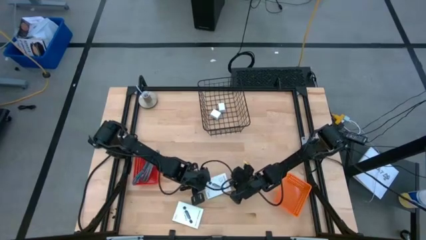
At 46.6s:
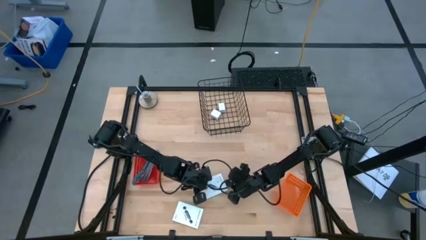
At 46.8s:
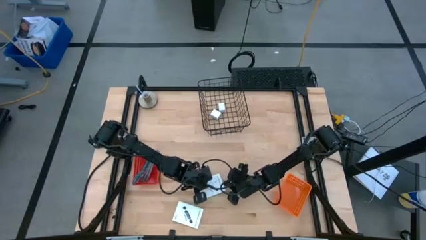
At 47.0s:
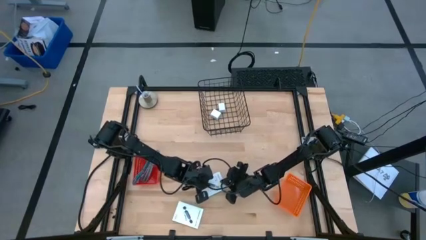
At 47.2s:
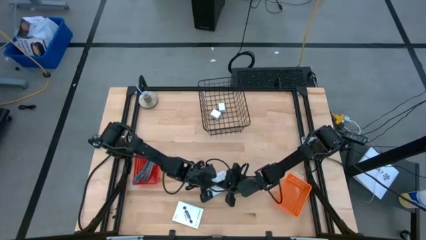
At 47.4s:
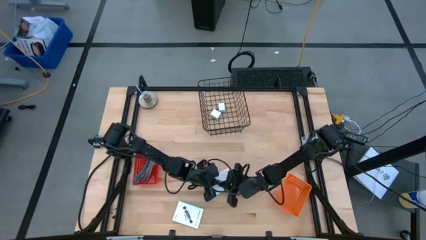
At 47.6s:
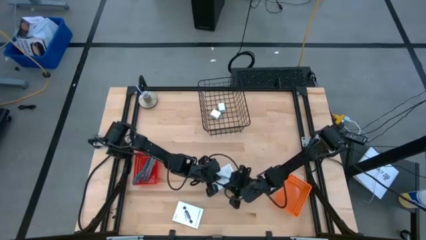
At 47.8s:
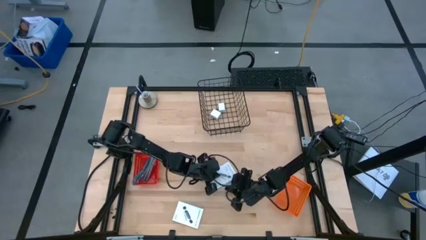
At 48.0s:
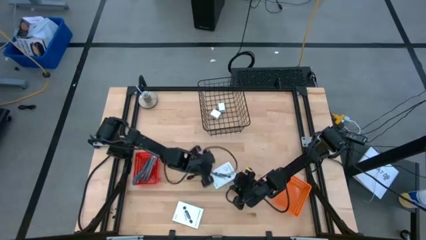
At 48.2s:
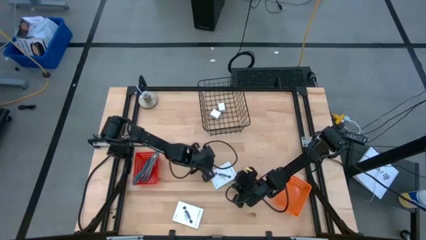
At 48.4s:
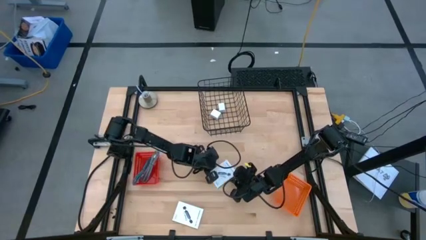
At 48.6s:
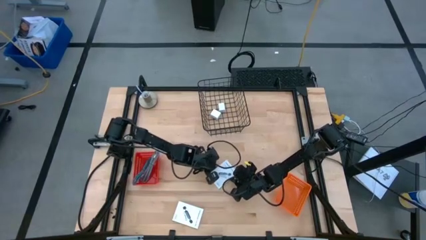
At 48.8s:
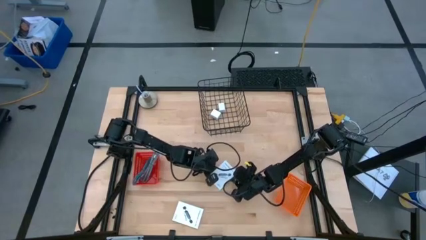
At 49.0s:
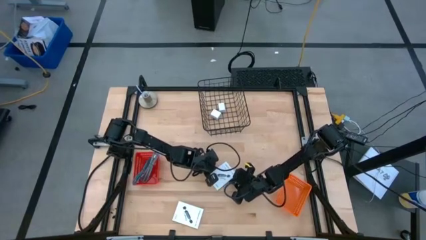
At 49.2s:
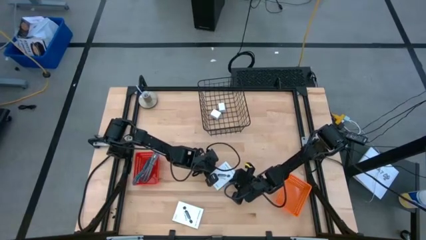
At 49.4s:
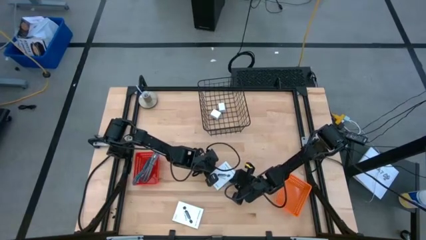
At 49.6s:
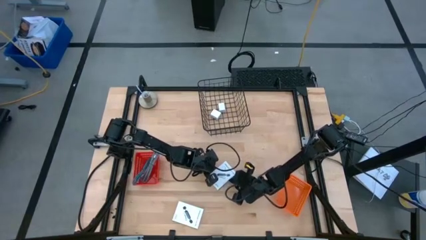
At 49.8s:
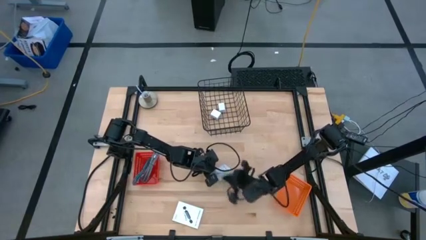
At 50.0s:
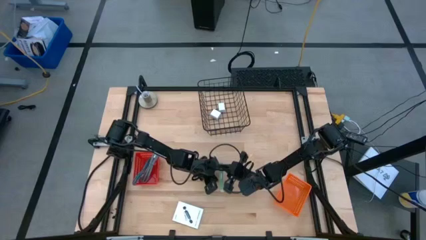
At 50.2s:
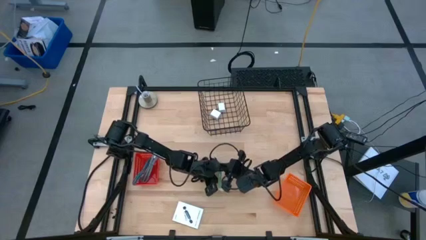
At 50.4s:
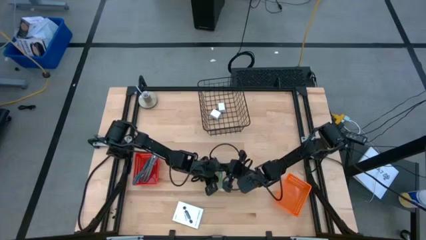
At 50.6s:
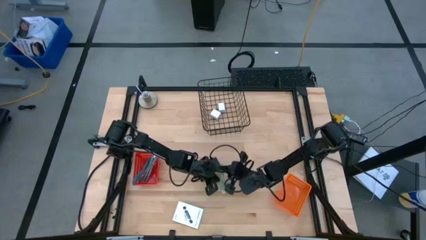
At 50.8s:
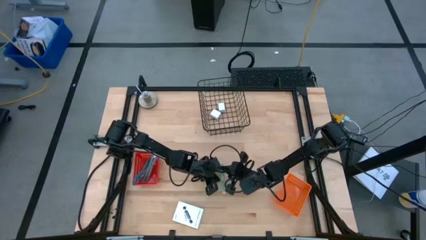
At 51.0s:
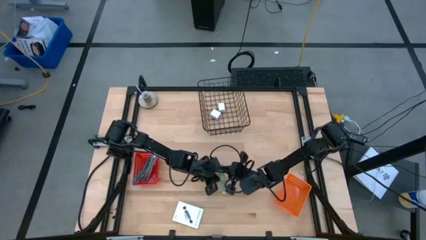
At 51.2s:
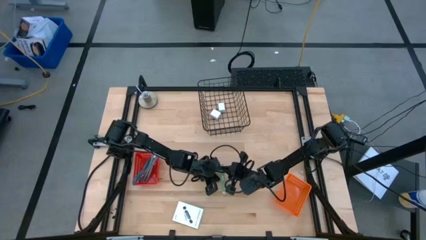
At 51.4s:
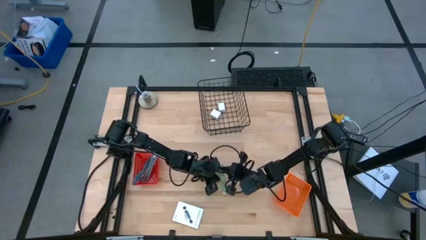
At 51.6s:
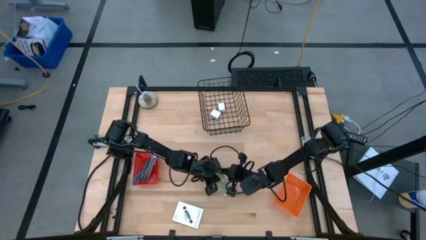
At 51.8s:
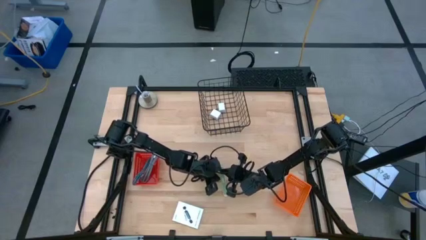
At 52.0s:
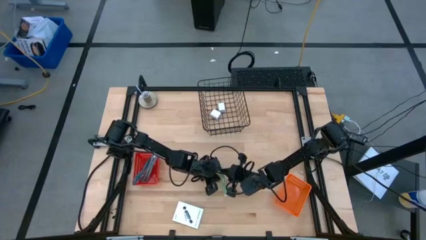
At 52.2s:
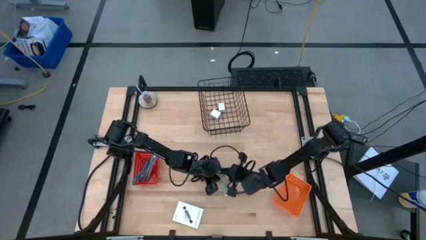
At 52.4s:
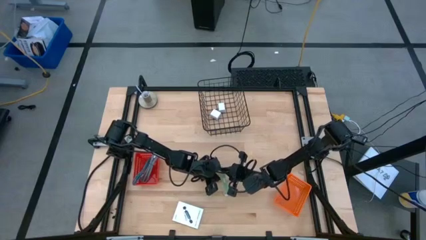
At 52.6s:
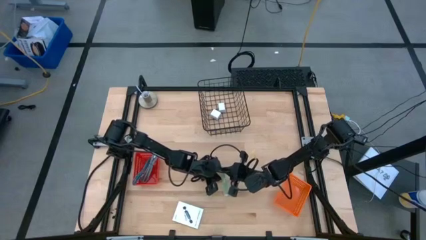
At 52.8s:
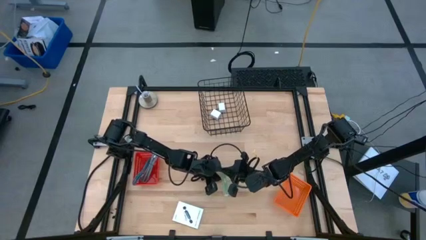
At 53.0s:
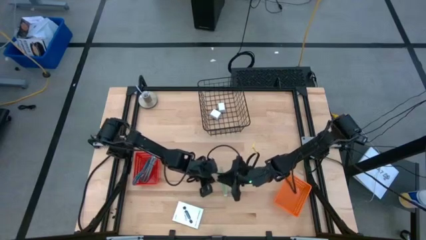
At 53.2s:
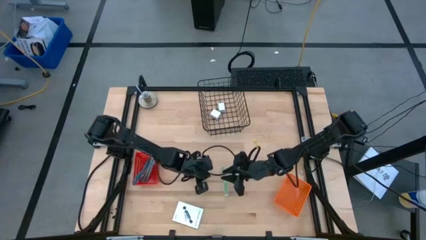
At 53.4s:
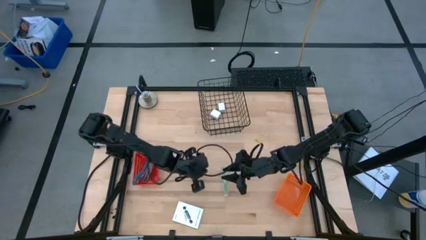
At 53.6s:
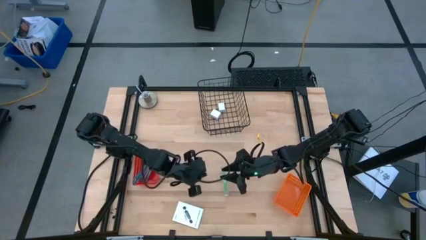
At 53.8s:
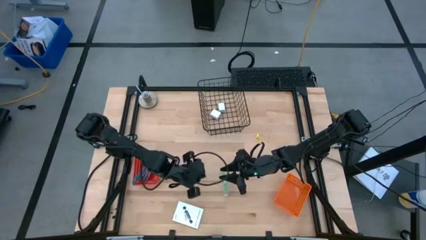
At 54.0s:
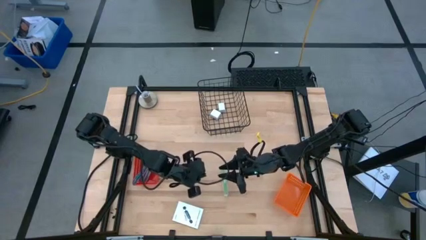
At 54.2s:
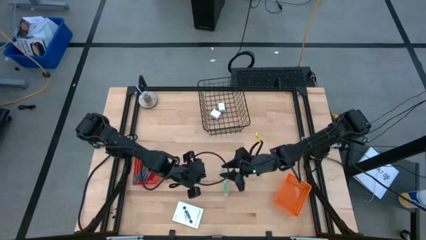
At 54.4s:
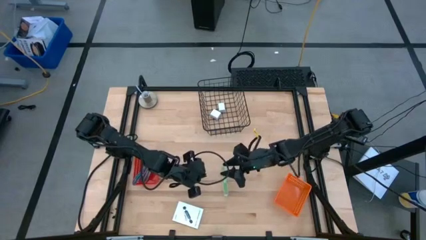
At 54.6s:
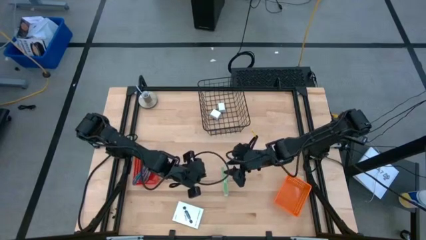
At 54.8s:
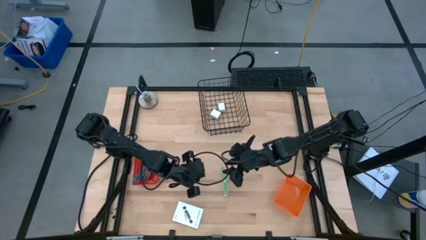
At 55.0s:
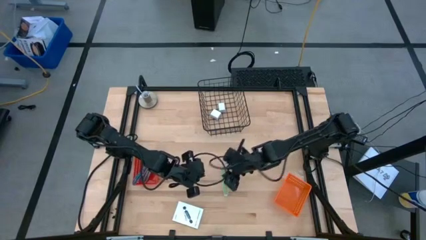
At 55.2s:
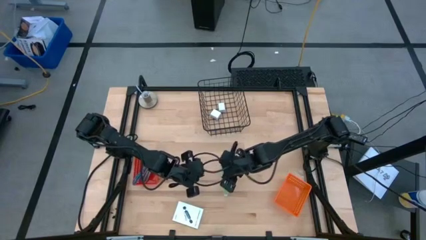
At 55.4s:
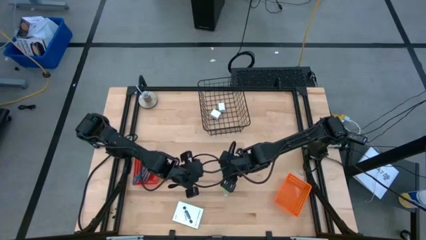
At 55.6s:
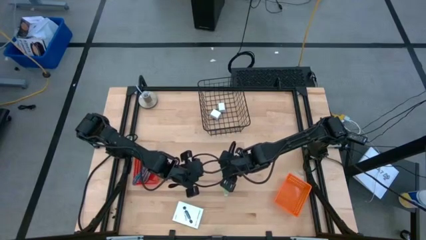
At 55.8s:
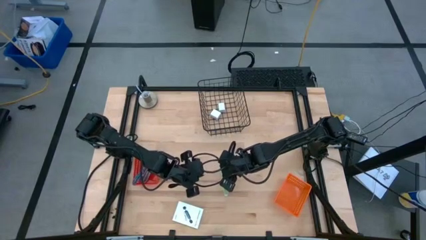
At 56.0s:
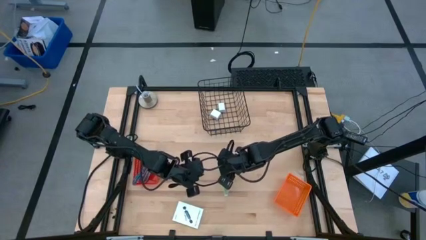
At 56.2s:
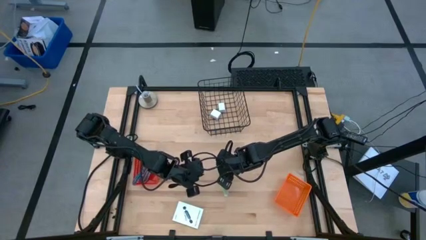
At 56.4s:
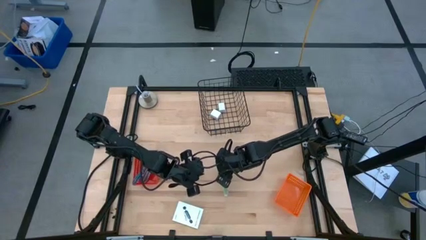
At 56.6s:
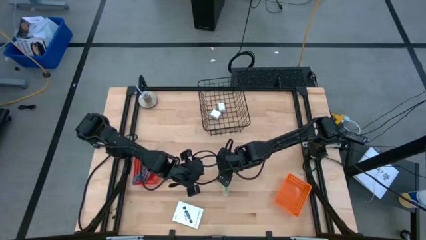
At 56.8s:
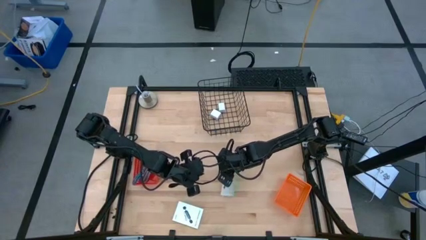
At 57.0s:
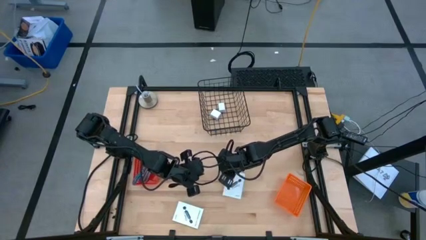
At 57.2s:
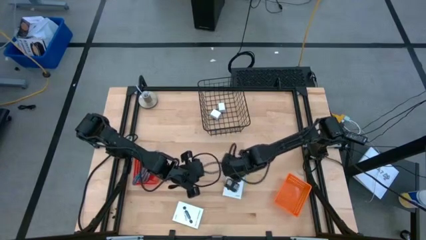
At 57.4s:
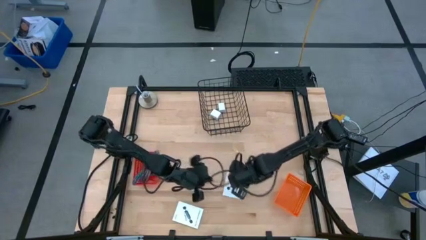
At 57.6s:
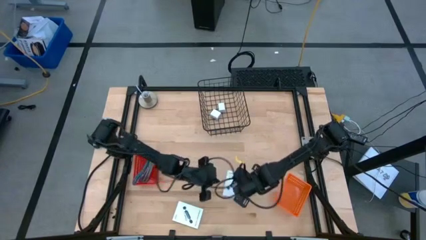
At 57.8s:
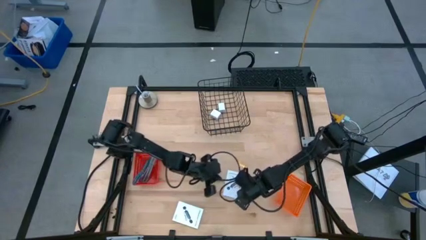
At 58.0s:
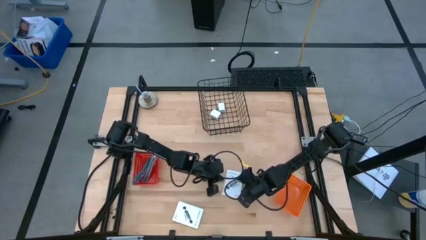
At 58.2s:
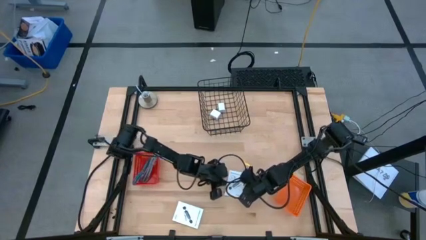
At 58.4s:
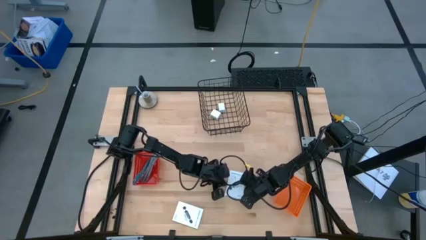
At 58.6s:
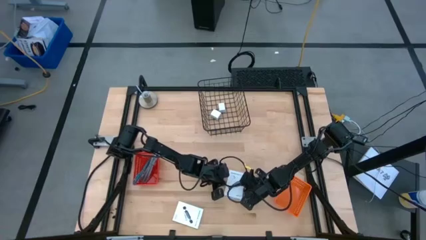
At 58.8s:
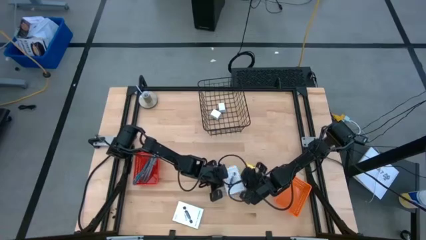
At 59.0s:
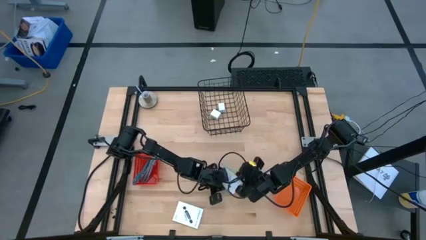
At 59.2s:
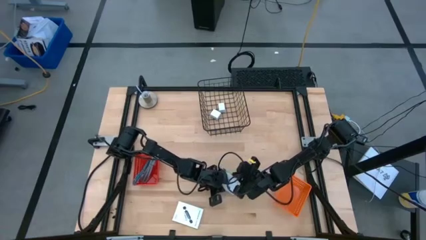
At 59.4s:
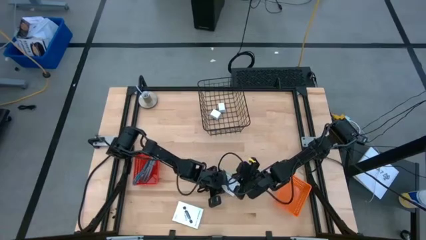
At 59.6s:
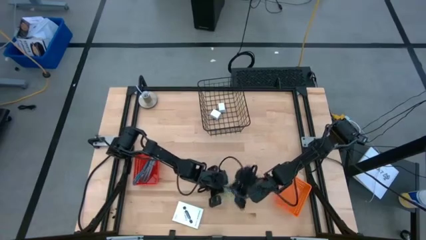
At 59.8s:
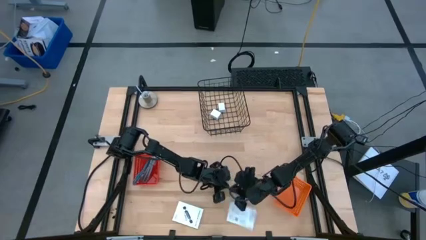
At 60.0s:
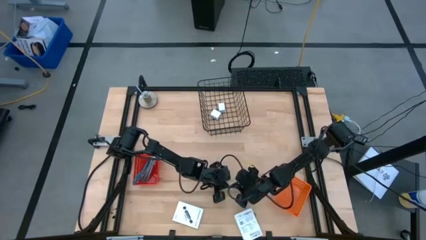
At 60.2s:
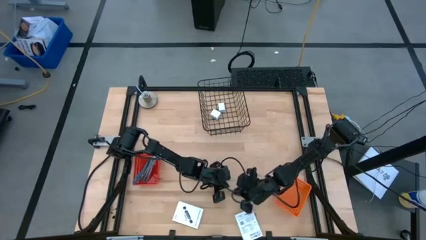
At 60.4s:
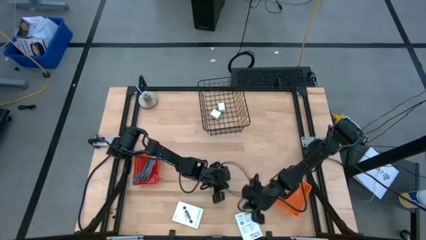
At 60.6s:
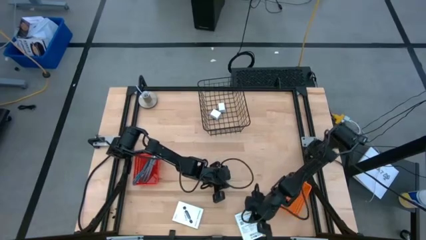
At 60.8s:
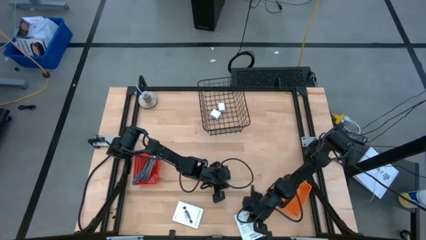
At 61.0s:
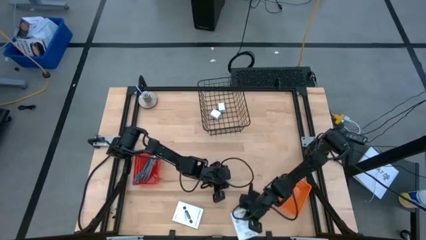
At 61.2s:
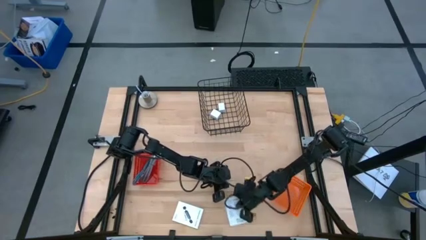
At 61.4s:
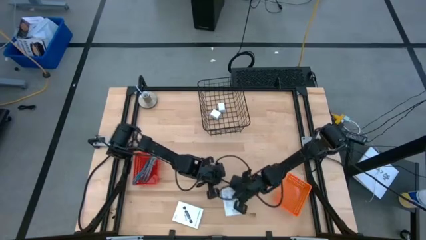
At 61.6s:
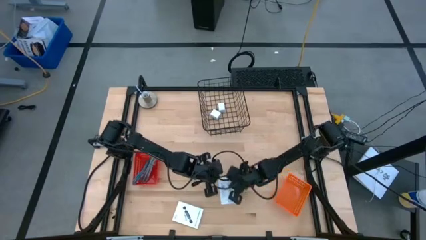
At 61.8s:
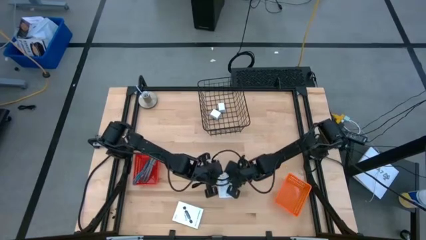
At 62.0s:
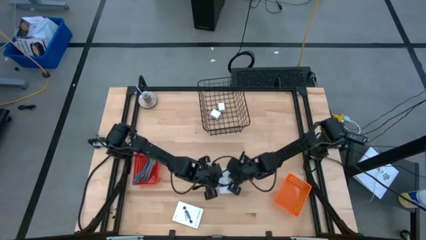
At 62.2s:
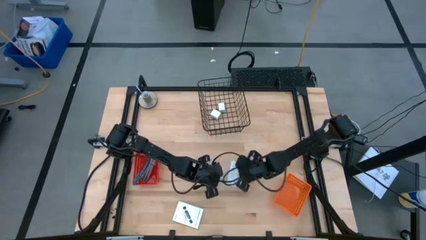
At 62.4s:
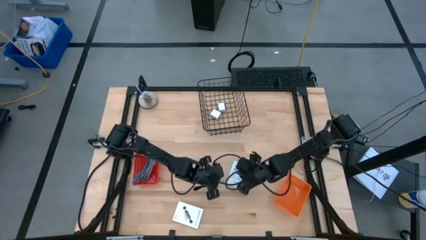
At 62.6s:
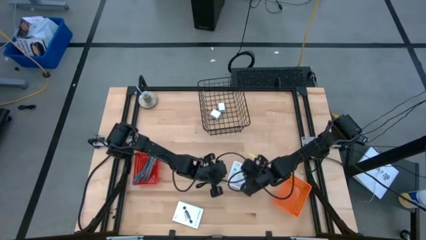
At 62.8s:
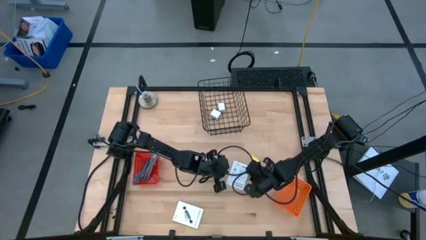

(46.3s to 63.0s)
Task: Pick and place items into bin
Put the right card reader box into the orange basket
